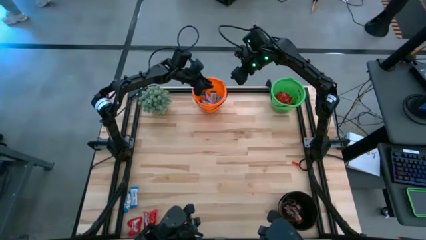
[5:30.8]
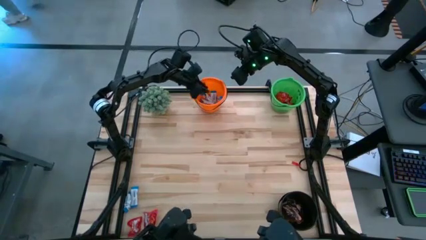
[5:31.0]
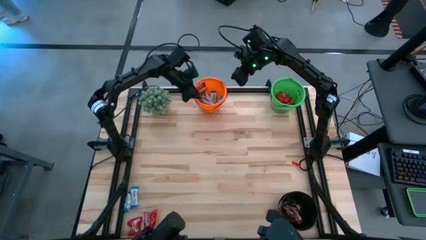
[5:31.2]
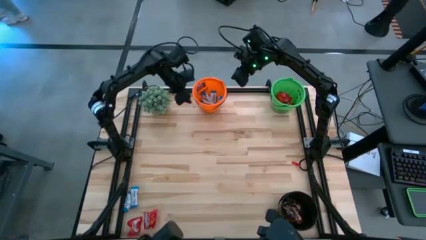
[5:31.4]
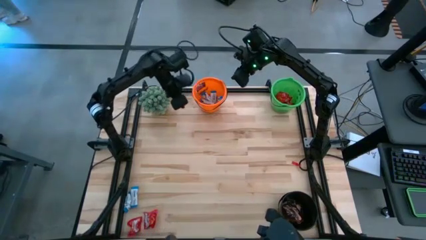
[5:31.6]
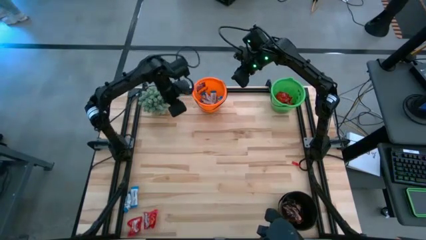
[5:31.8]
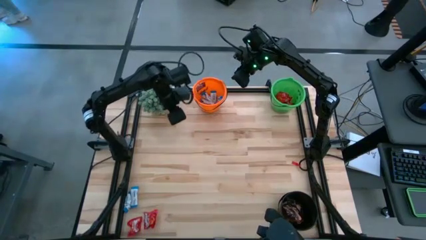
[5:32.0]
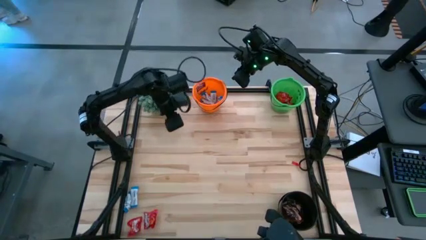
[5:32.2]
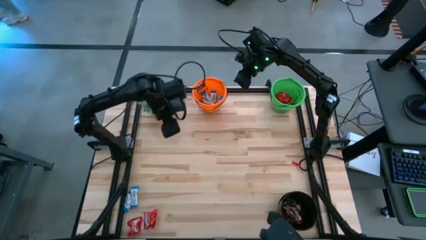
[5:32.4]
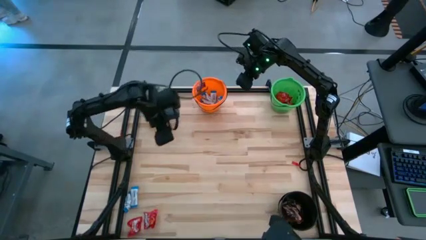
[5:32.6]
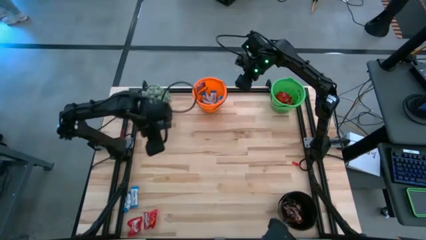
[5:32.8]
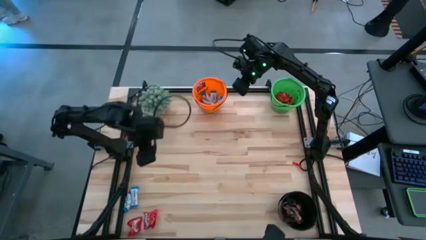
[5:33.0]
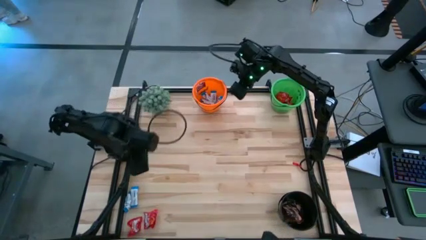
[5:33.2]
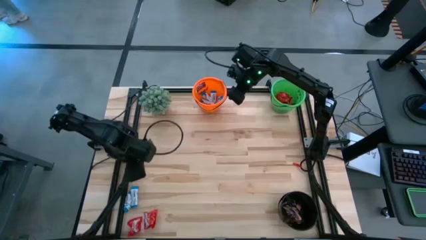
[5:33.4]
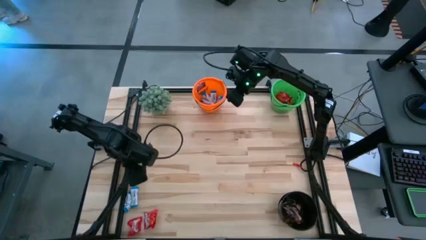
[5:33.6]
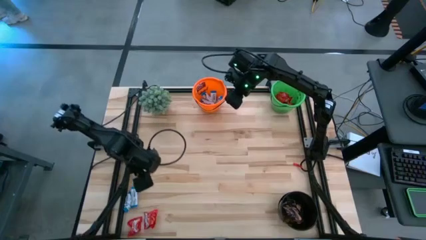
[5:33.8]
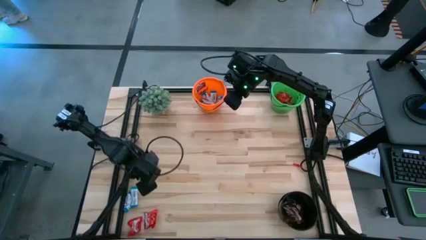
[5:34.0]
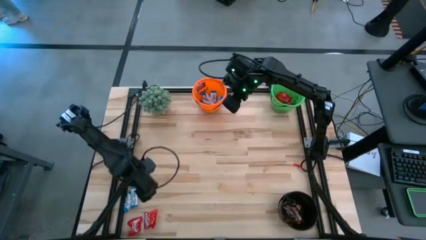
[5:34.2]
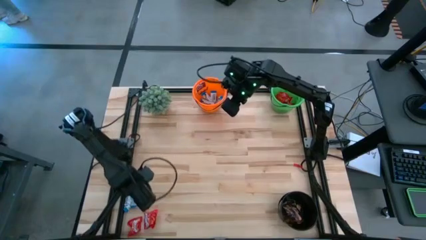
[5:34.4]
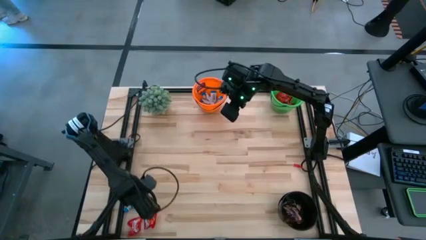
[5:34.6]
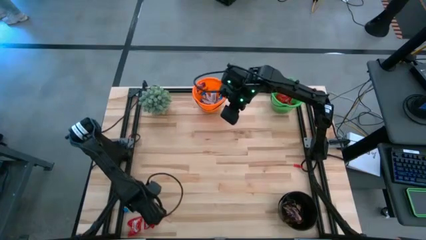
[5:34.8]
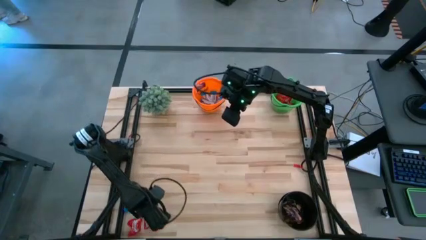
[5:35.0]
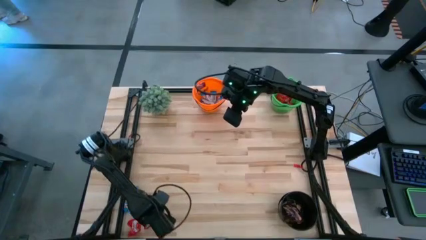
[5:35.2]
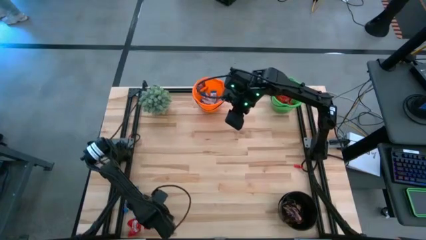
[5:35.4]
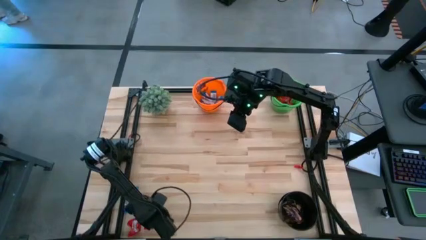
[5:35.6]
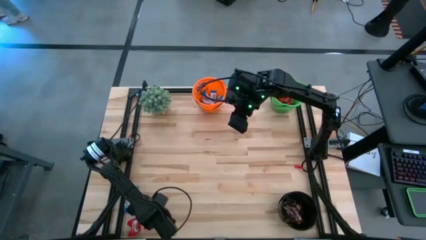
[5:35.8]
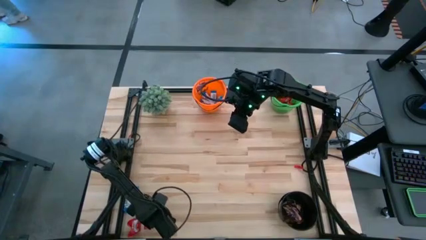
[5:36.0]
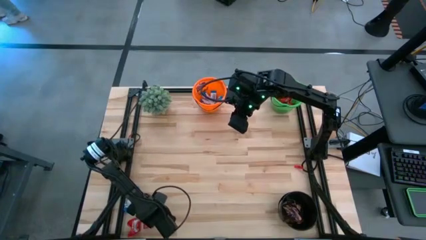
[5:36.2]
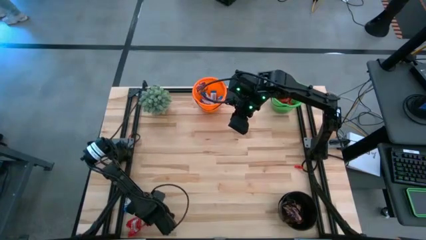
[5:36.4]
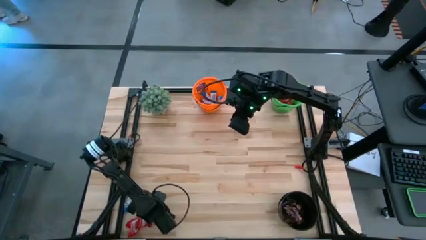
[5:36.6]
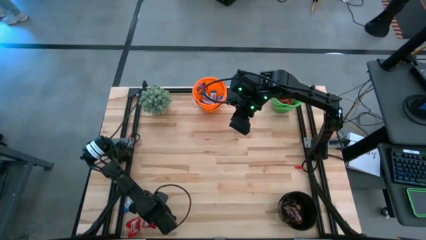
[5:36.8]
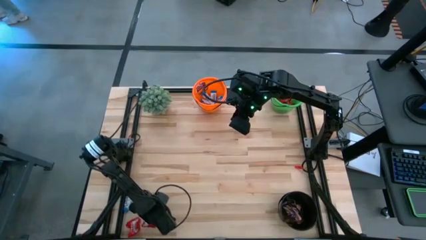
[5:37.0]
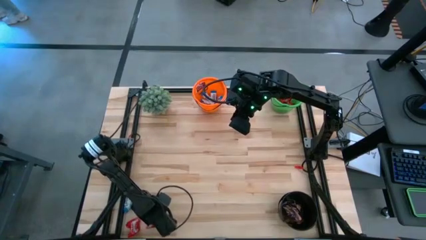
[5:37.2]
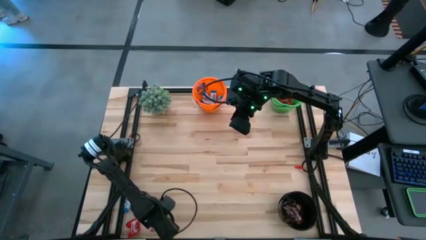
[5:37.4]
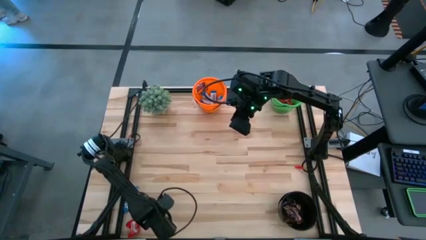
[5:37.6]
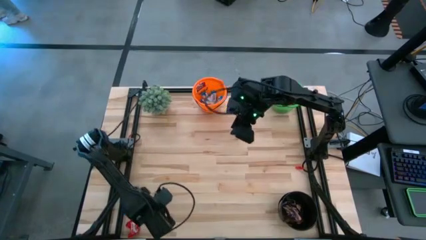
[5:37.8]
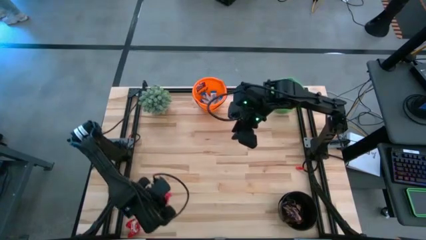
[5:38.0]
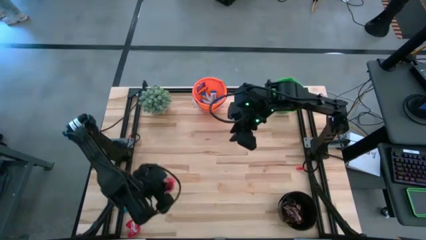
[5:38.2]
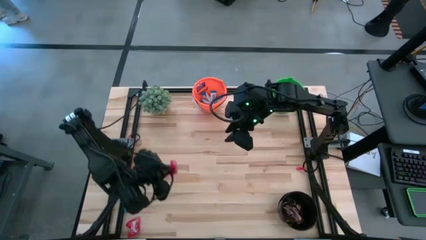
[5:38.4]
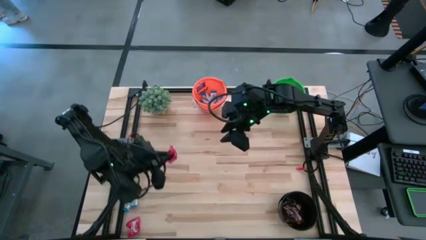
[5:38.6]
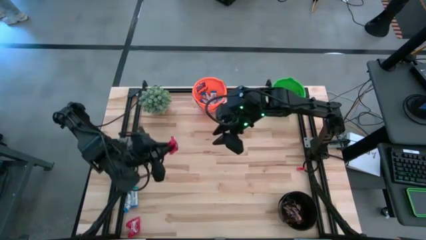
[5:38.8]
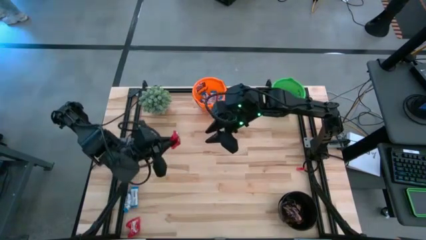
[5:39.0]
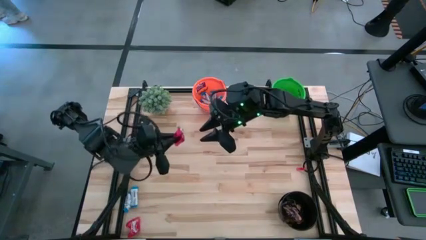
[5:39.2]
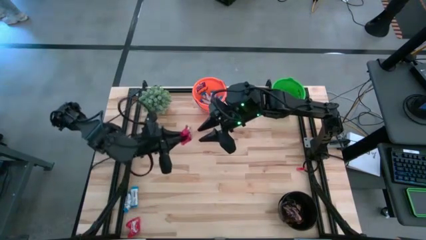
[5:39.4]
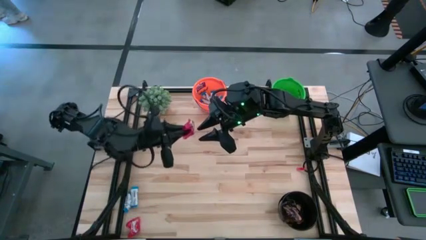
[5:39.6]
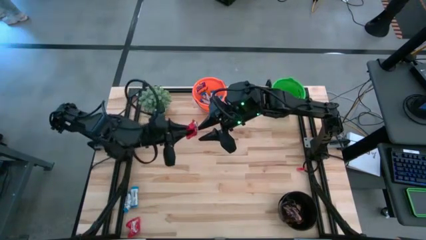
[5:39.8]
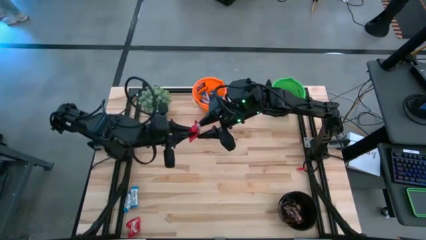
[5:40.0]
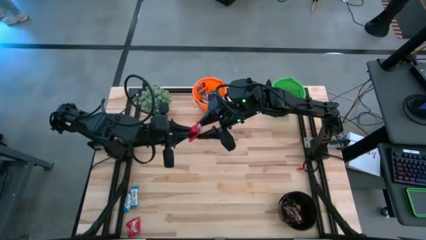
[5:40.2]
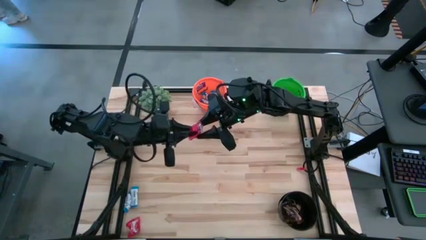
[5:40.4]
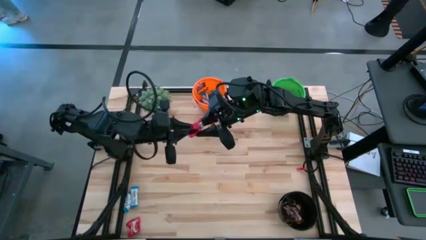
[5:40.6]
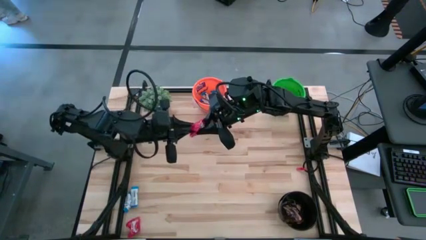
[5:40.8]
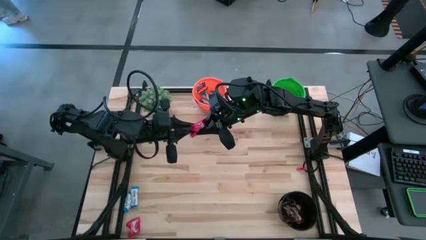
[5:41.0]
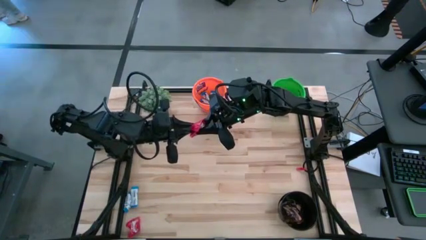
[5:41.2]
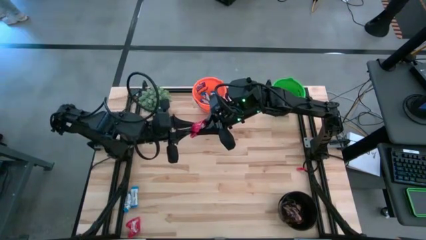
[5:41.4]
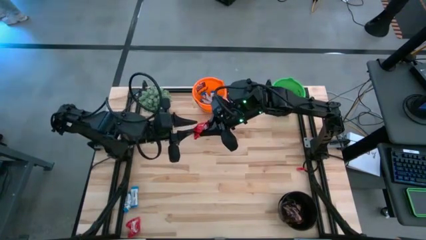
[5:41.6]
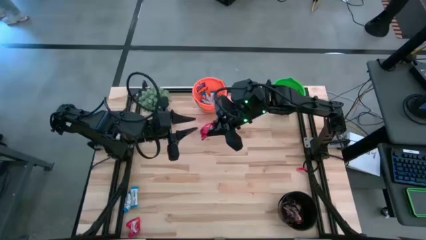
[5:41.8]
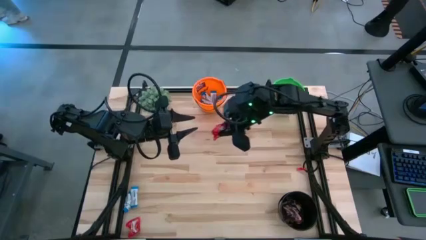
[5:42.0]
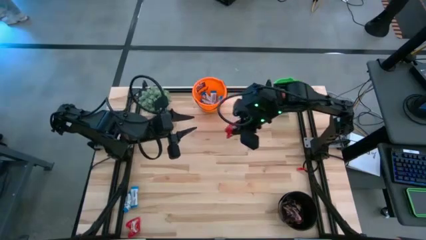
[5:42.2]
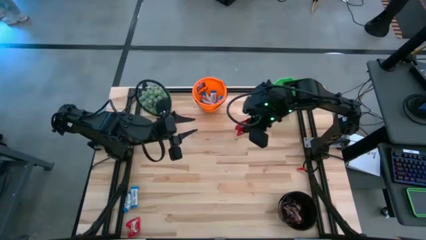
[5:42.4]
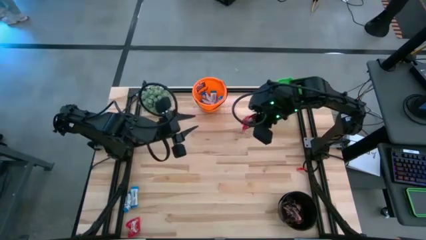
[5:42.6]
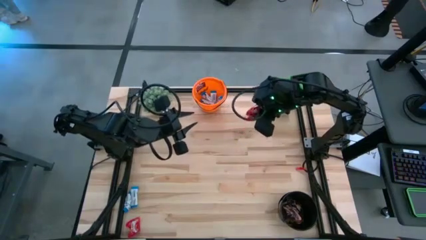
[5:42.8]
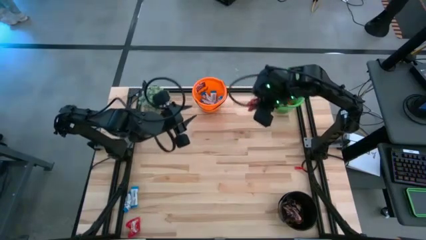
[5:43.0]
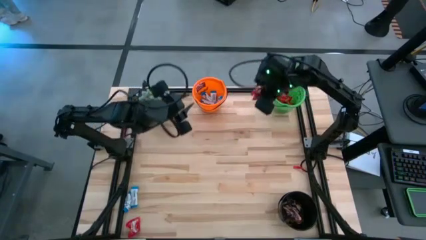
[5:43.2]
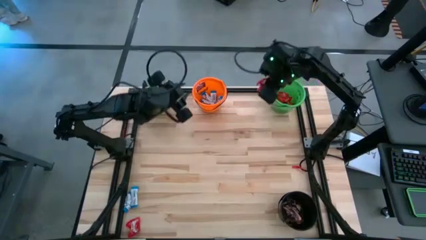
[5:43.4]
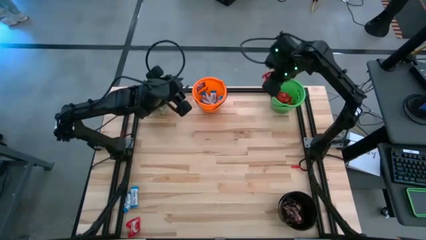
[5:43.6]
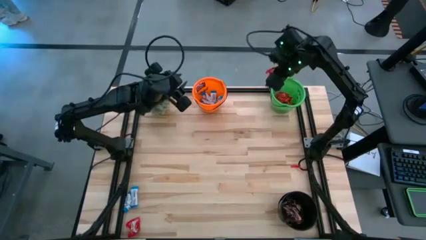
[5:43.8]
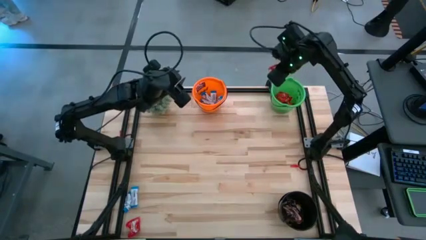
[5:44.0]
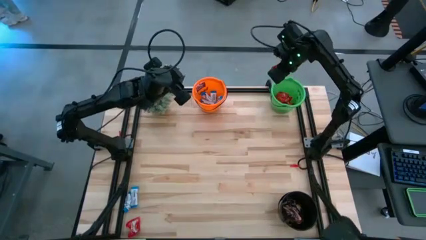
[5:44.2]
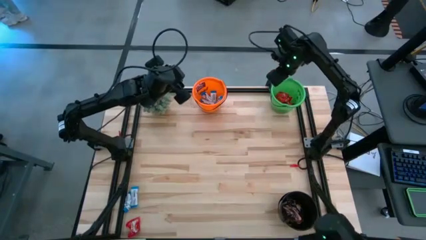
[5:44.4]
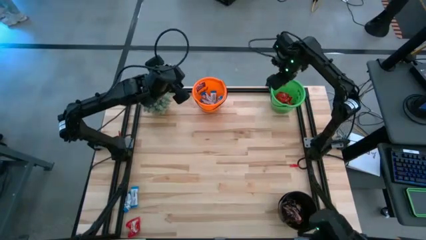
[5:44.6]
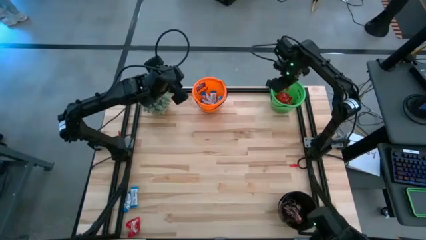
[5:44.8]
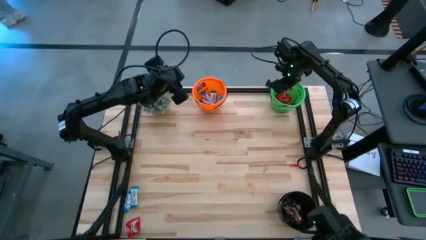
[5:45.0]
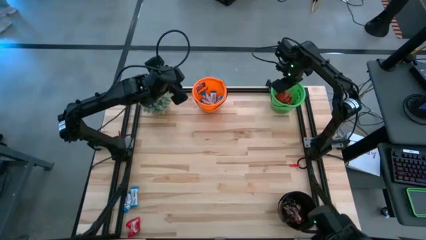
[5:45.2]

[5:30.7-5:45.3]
Task: Organize candy in baskets
Put the red candy into the green bucket
